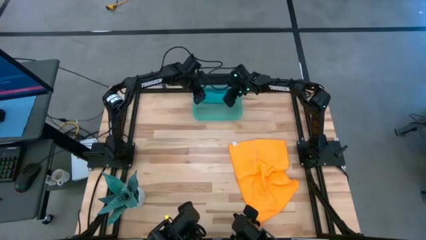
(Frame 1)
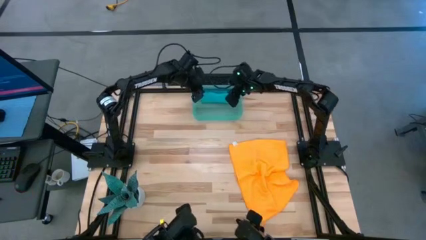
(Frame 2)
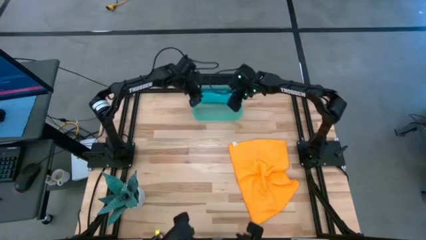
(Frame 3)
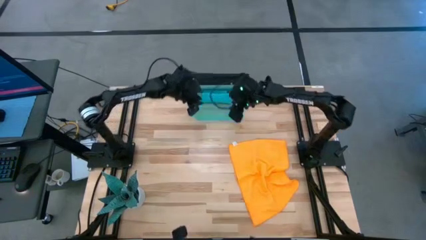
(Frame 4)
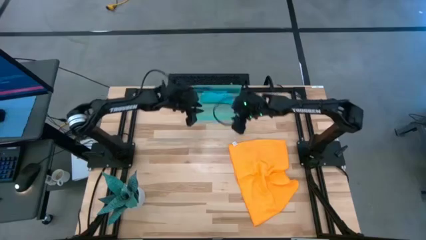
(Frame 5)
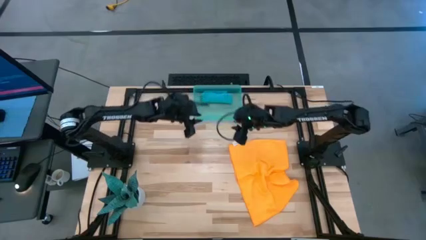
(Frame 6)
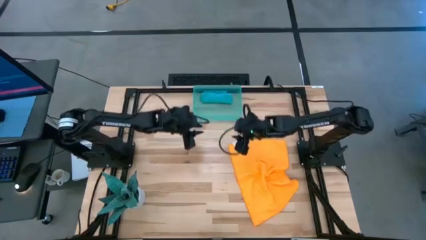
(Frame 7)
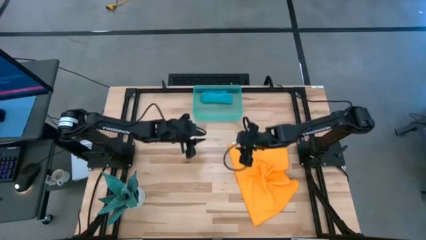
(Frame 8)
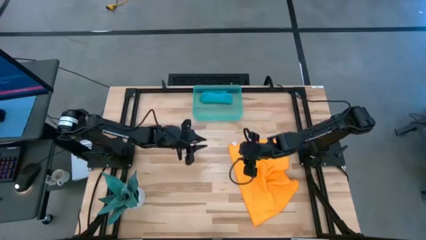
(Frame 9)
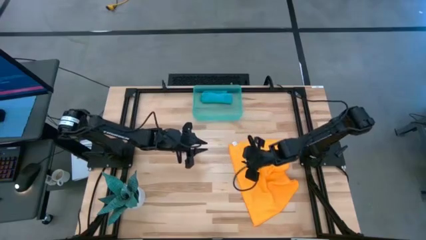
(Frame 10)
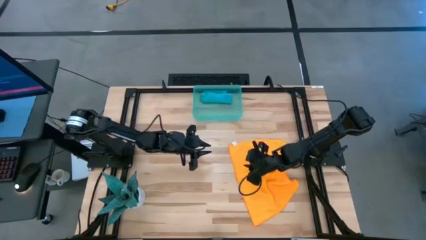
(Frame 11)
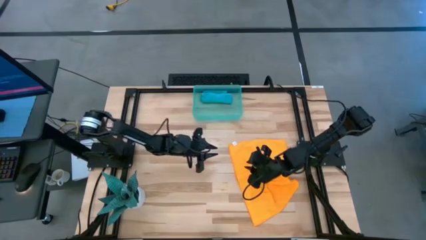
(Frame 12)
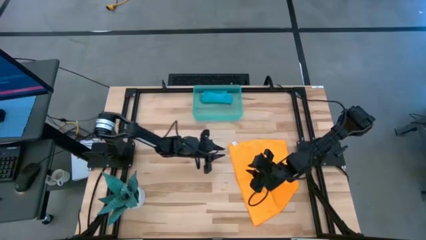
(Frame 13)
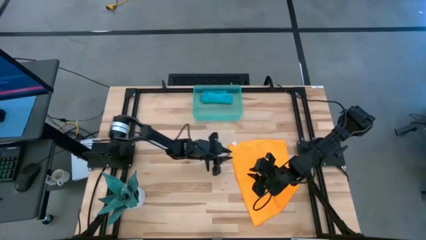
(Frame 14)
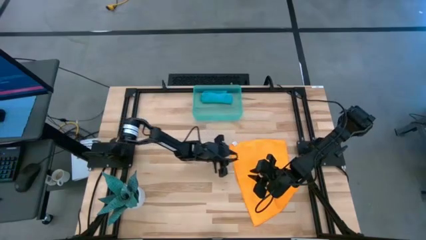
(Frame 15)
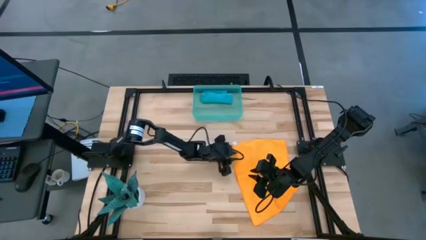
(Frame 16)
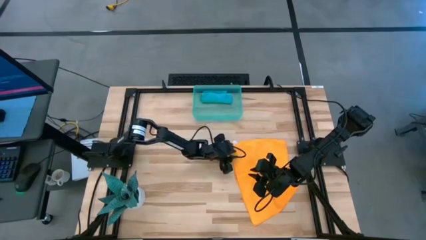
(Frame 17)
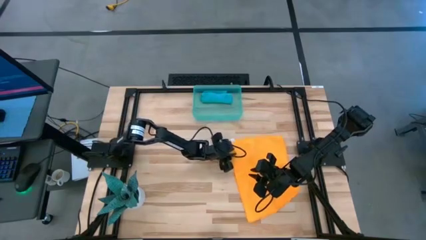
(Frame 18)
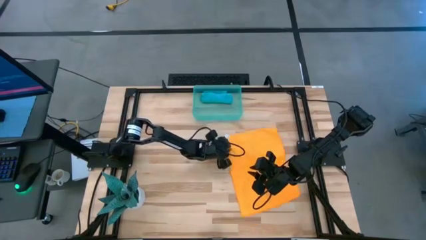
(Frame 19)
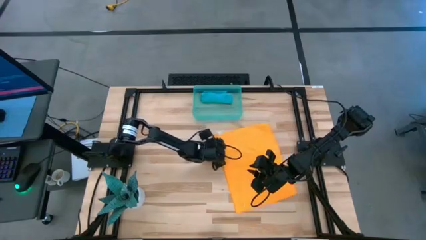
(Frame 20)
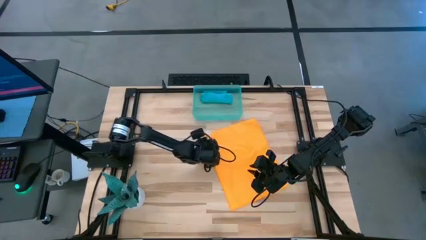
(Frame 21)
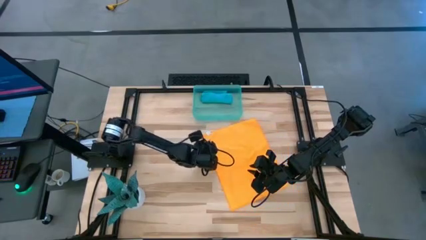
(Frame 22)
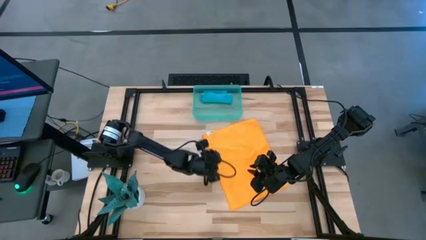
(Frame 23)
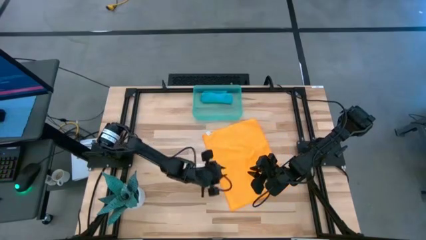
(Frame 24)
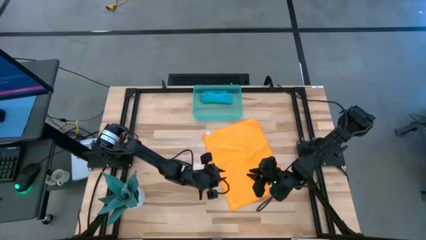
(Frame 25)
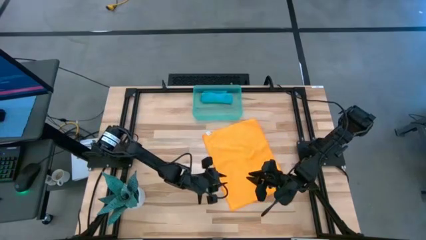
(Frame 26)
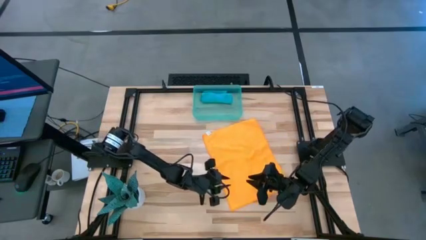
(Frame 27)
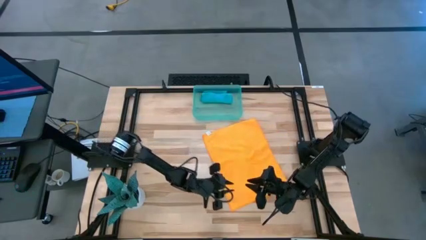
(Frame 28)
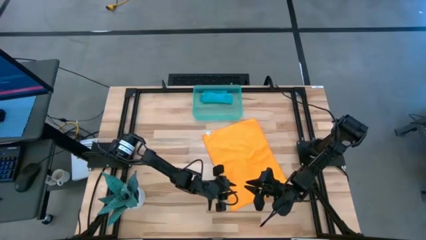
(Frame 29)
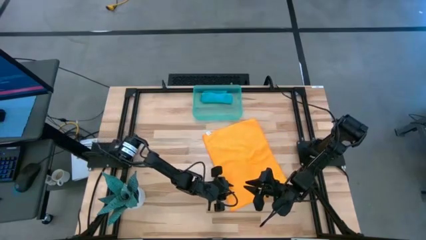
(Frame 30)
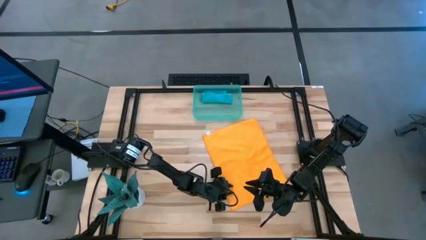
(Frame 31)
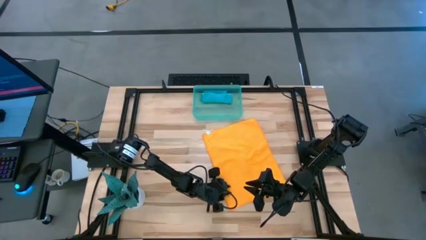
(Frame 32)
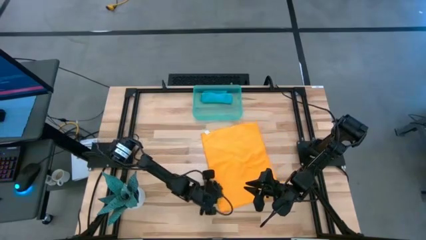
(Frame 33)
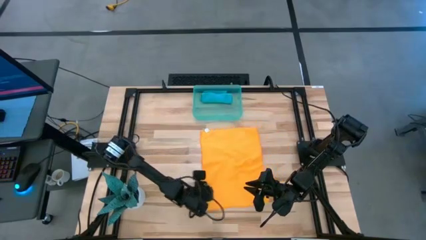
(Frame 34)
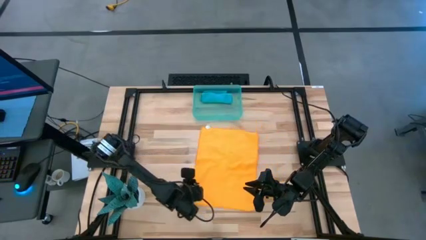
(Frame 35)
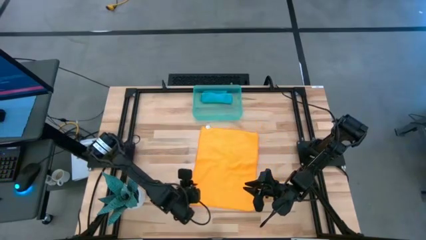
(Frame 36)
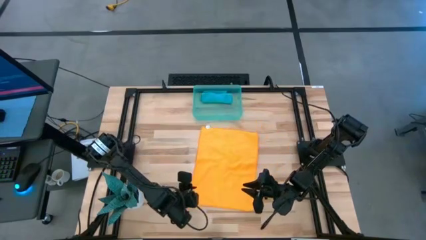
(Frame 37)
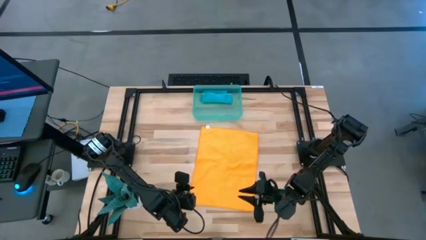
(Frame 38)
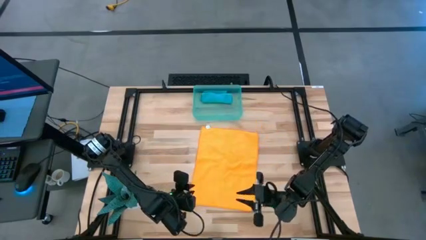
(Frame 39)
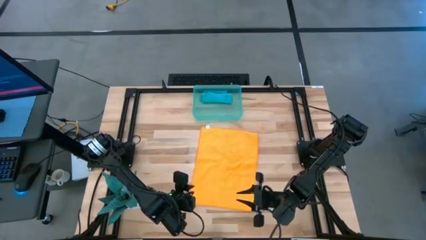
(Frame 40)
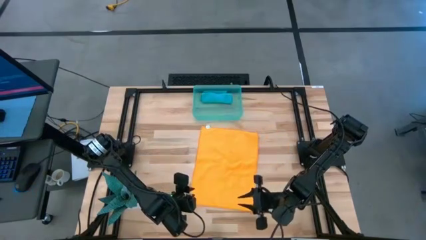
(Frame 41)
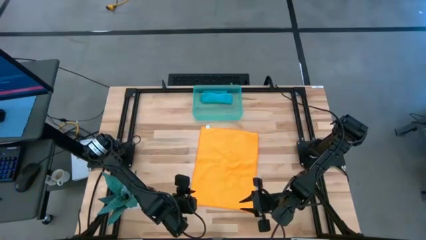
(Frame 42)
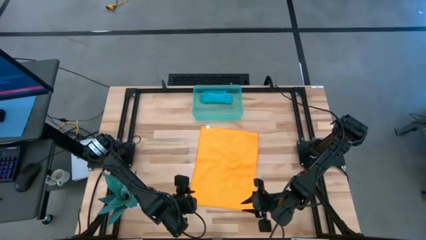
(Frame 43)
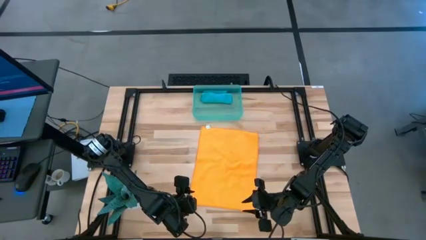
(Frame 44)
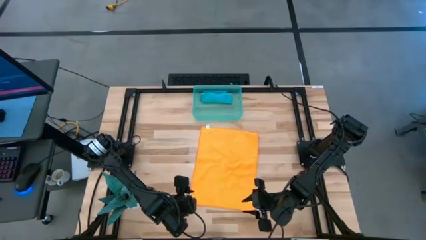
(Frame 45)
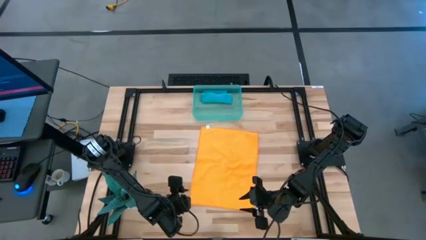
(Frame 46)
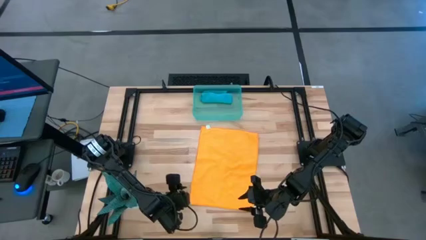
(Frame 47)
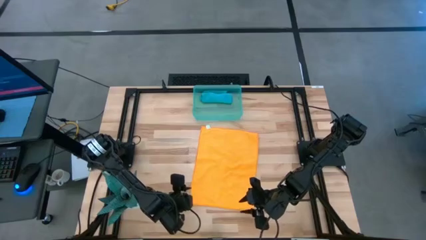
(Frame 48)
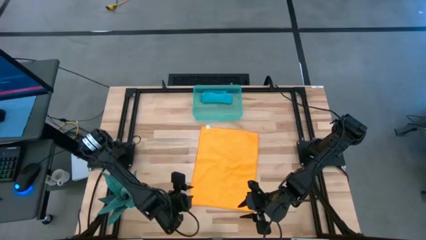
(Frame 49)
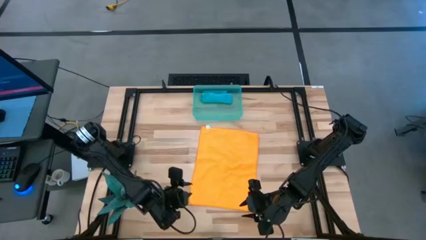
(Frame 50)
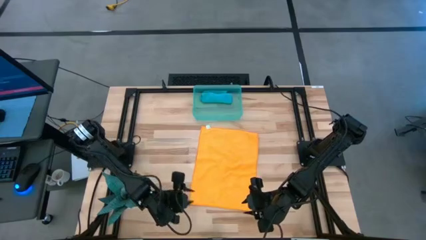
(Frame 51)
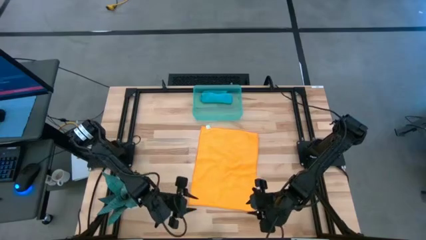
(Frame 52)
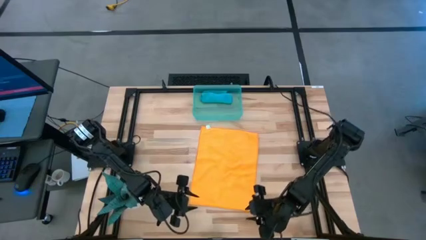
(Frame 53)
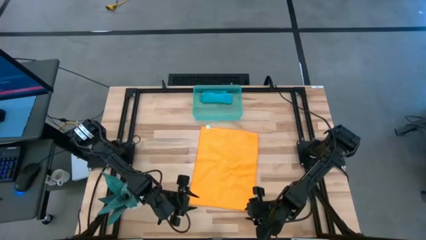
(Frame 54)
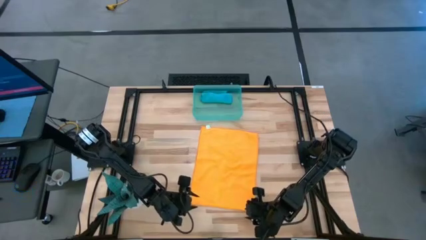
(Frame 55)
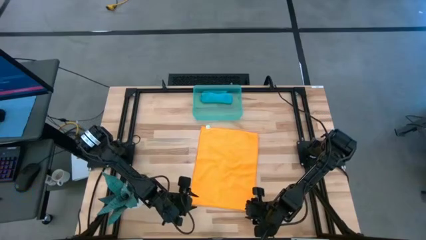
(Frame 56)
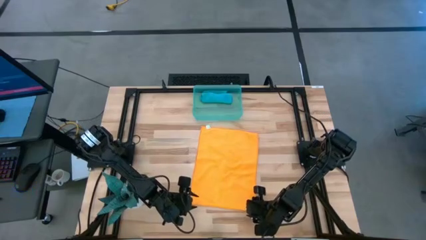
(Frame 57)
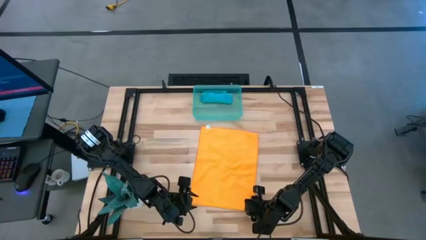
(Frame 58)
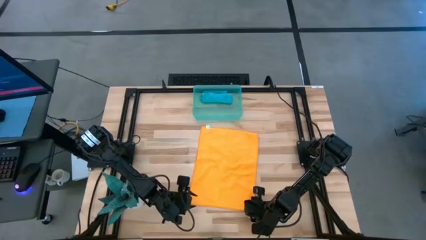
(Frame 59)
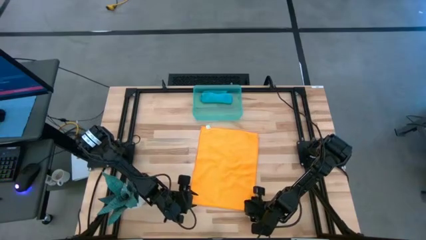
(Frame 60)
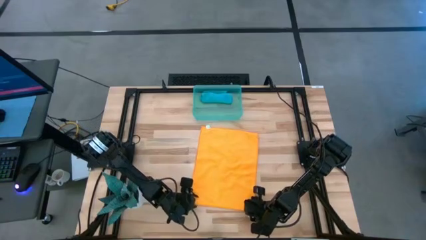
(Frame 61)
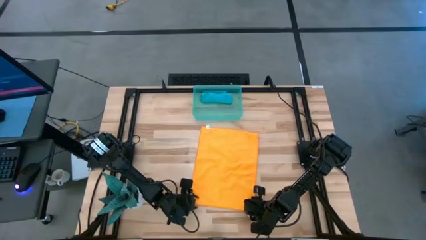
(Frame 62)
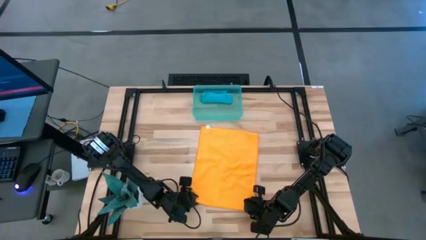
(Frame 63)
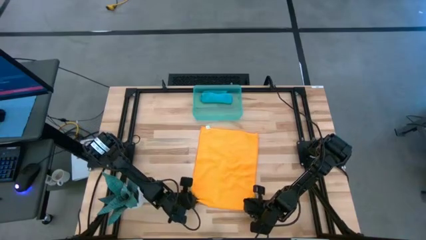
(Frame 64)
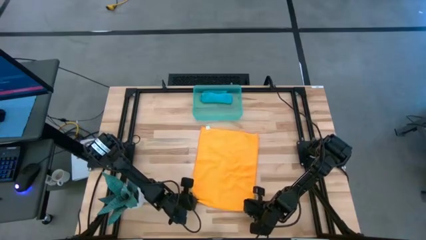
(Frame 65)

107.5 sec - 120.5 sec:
Task: Roll microfiber towels into tight, uniform cylinder then place into a basket
Fold the orange microfiber cloth

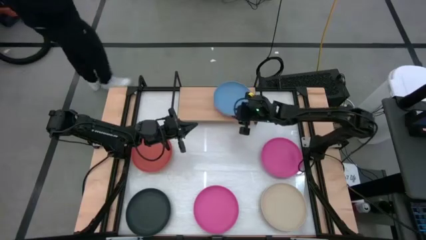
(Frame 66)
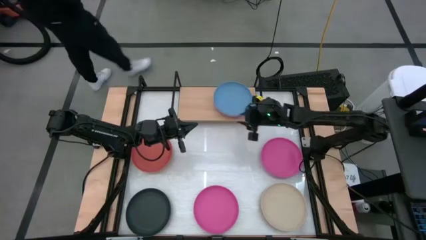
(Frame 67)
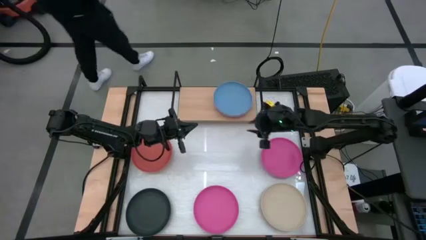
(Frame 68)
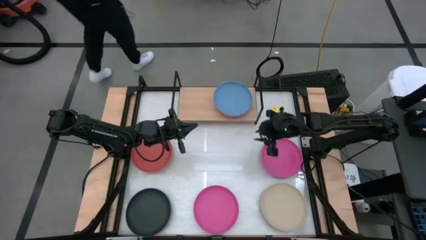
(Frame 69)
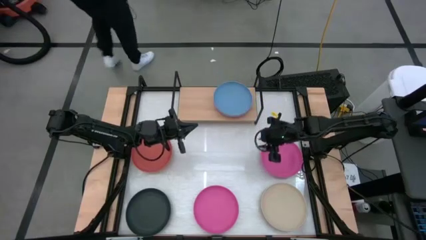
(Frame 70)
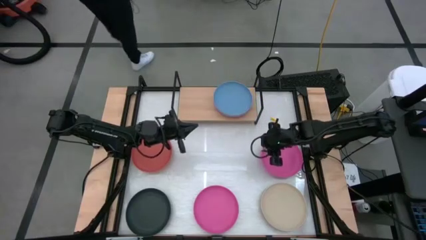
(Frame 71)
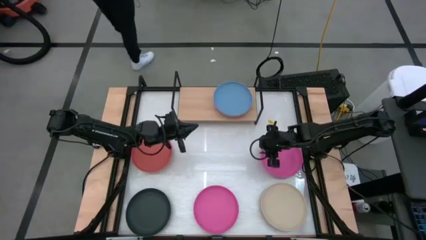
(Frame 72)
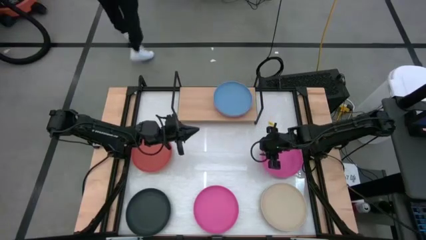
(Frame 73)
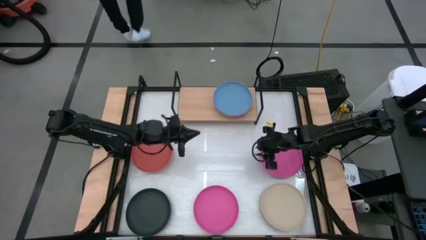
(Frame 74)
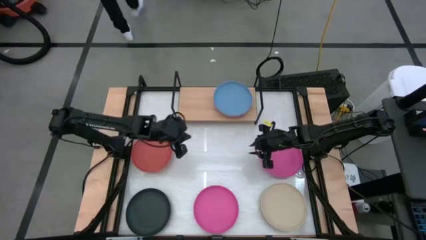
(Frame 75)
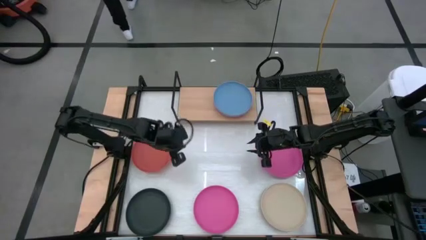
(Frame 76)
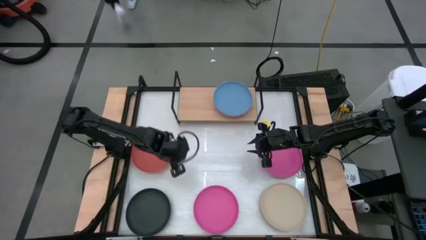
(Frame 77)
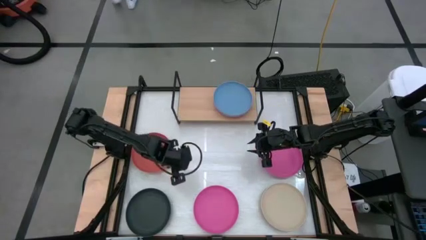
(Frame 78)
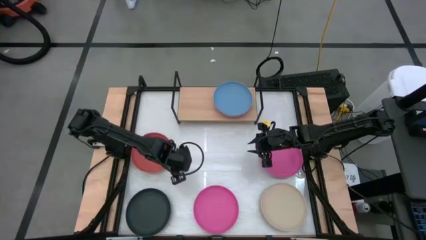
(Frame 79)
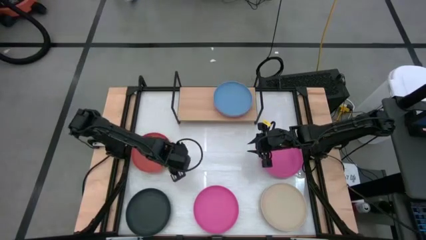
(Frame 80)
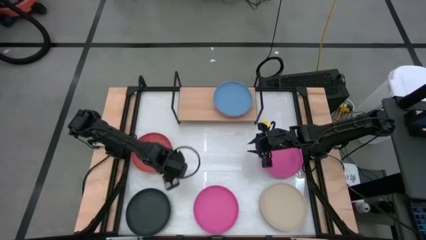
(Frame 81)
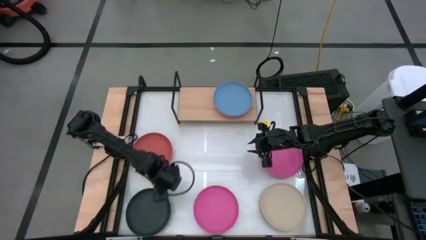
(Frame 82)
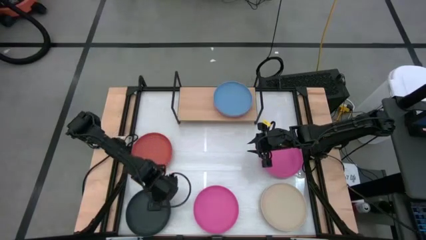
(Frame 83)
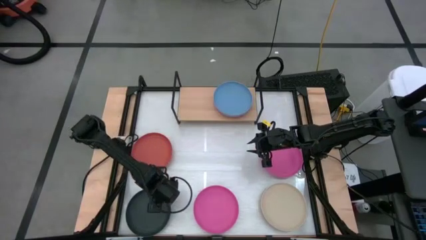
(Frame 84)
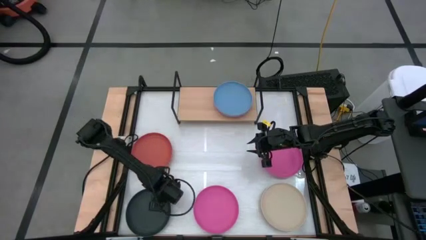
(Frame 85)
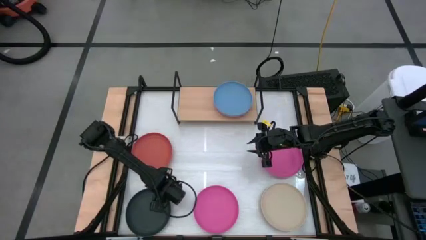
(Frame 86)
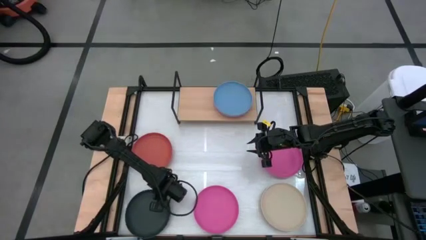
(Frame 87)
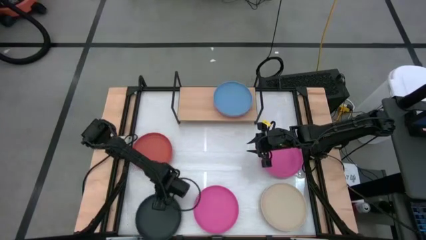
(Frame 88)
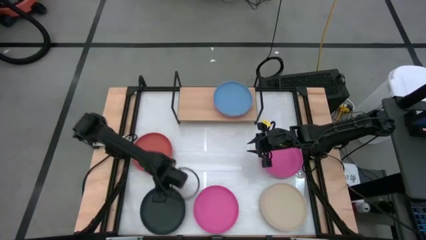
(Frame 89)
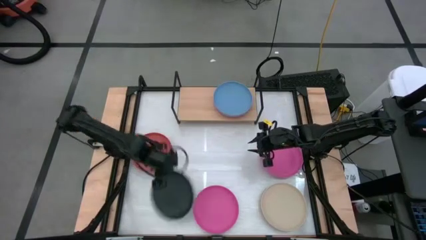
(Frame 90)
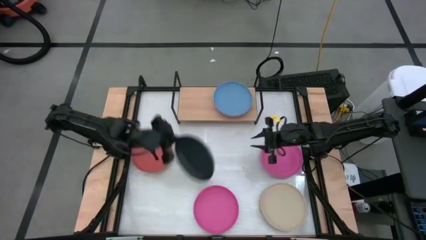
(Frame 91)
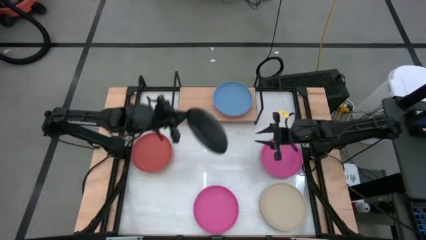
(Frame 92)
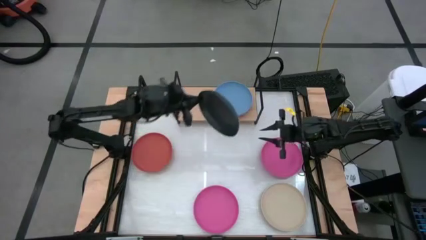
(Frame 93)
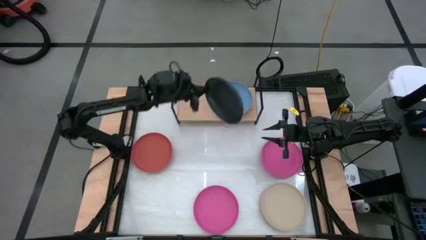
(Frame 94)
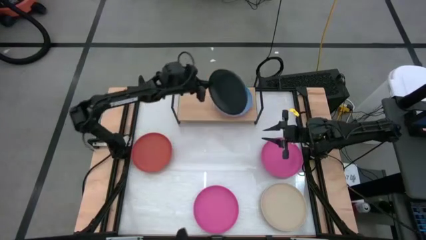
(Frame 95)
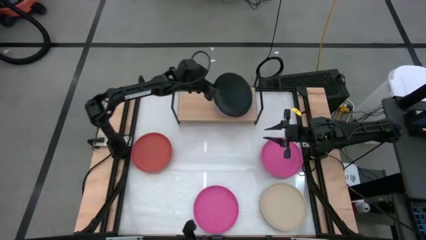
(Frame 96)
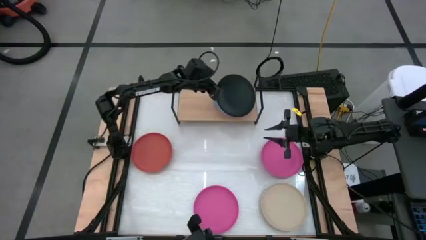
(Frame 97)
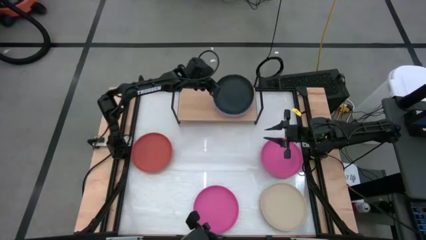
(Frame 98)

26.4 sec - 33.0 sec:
Task: Place and stack plates onto a shelf
Stack the black plate on top of the blue plate on the shelf
